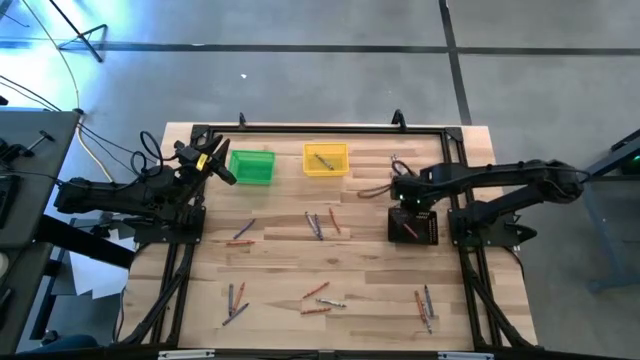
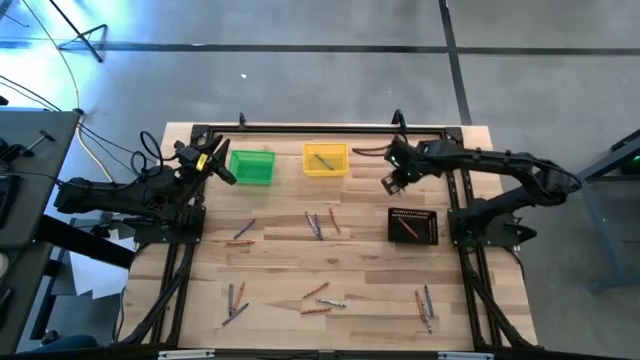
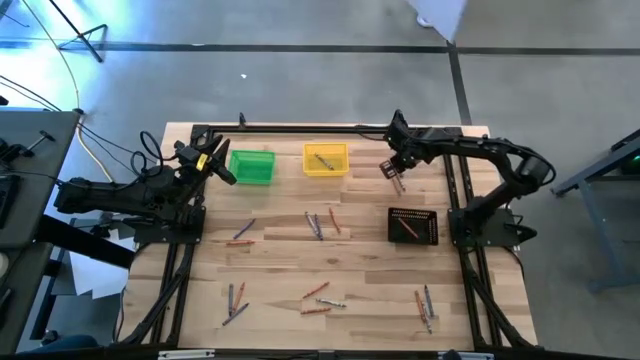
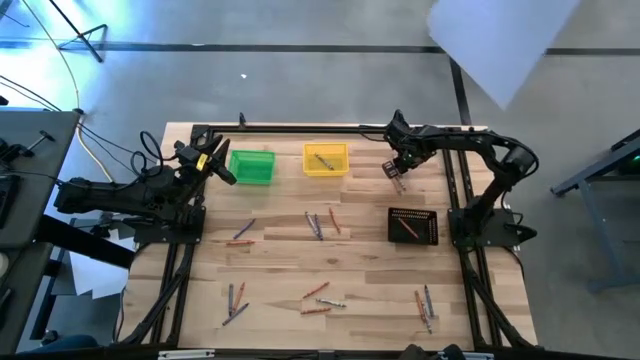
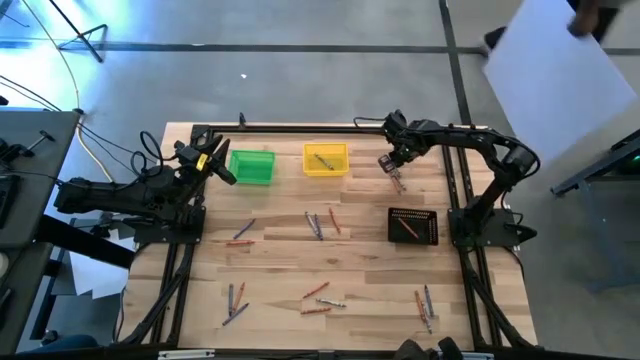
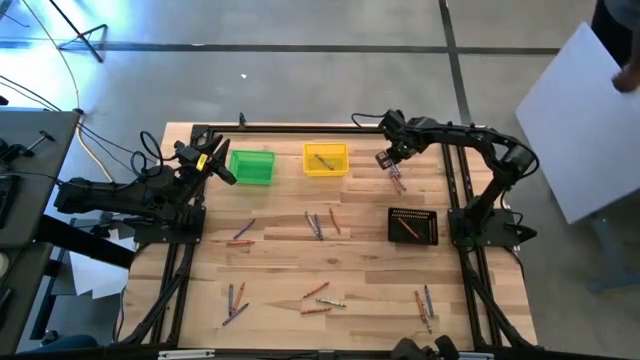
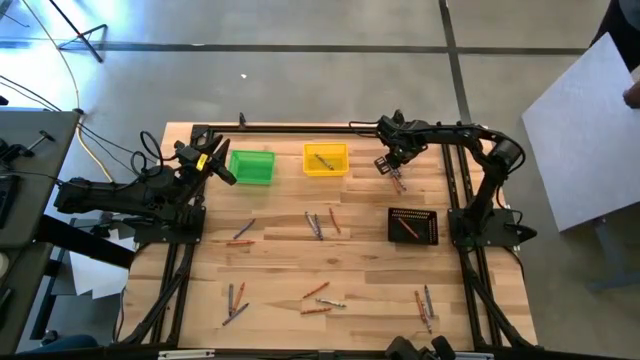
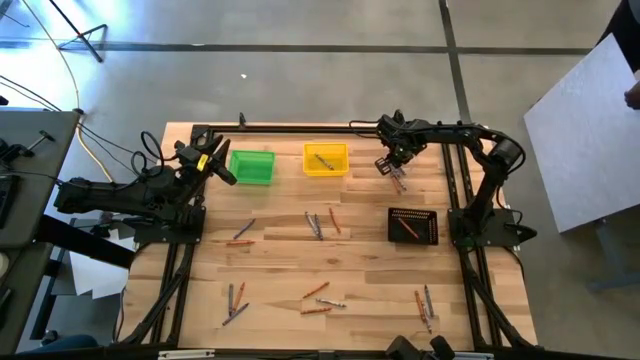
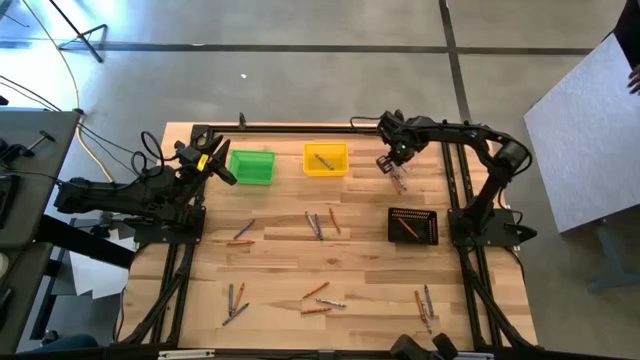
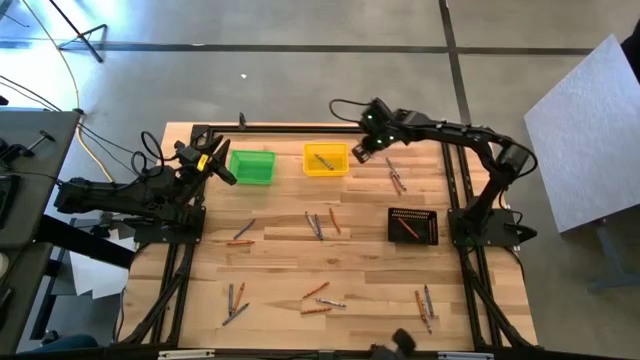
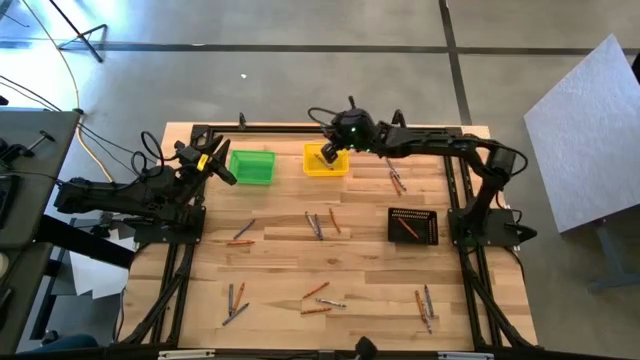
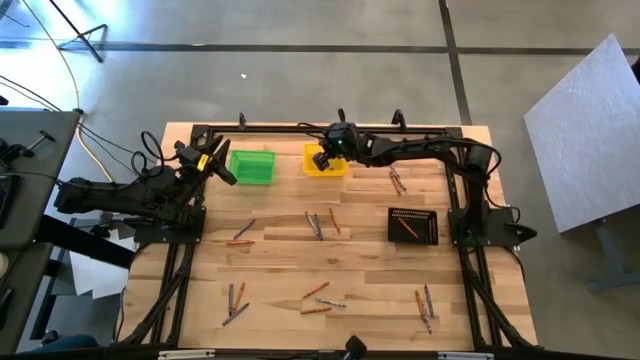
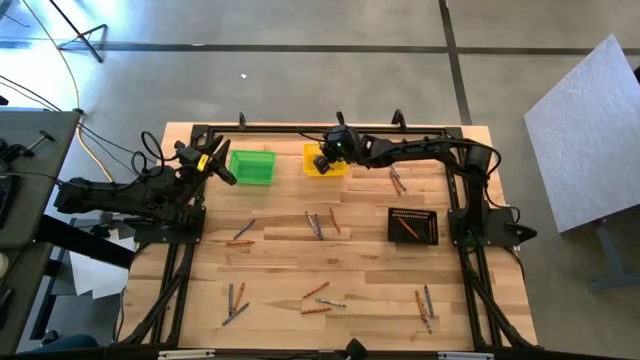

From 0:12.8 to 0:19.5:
Task: Sort crayons
Put the gray crayon into the yellow bin

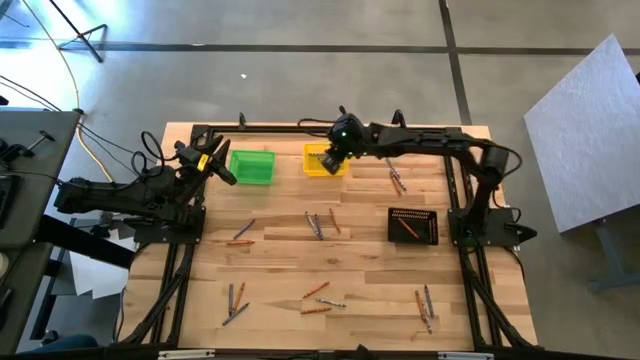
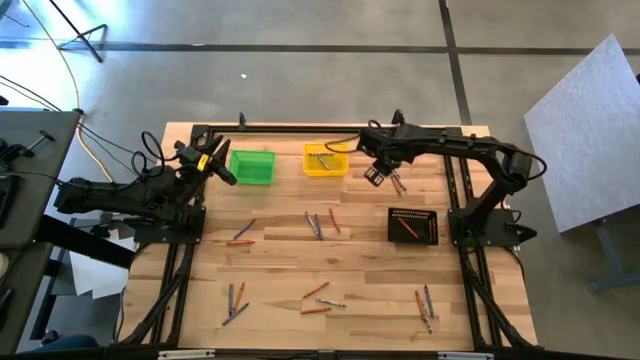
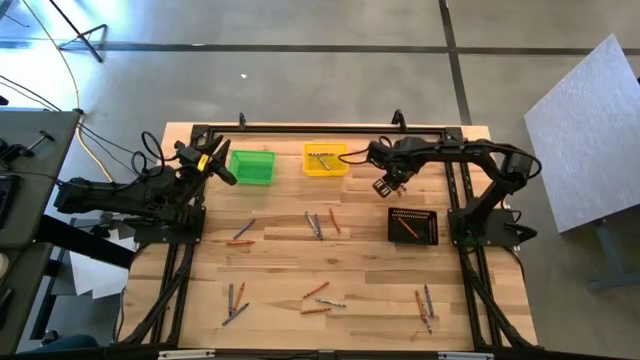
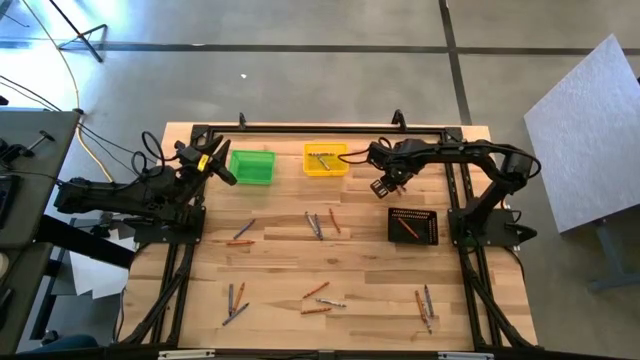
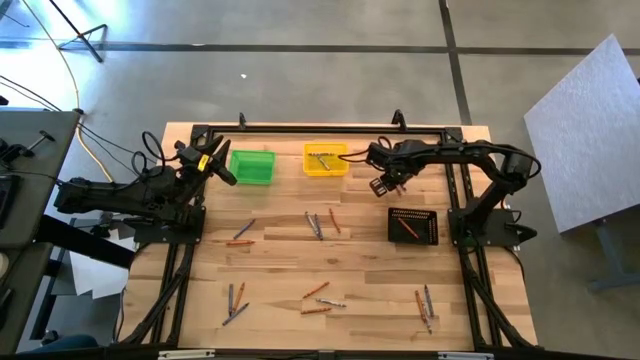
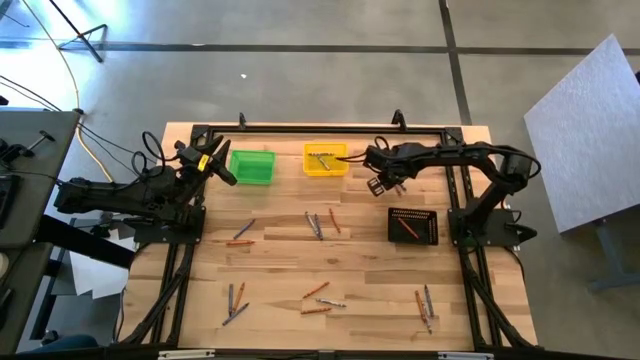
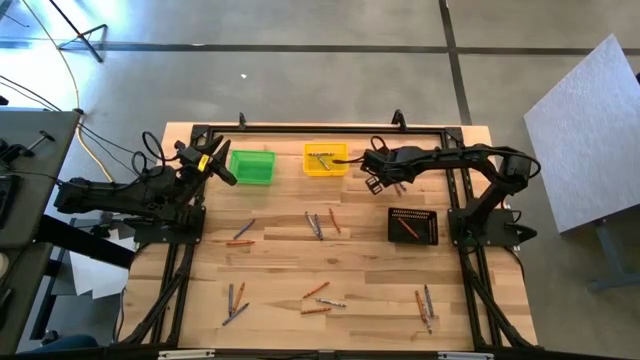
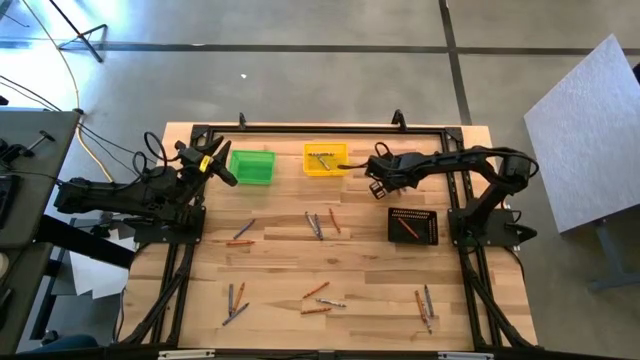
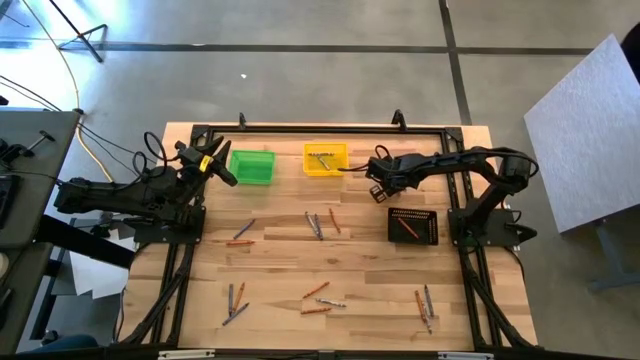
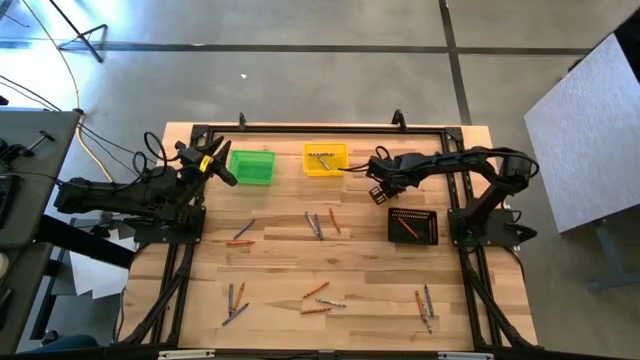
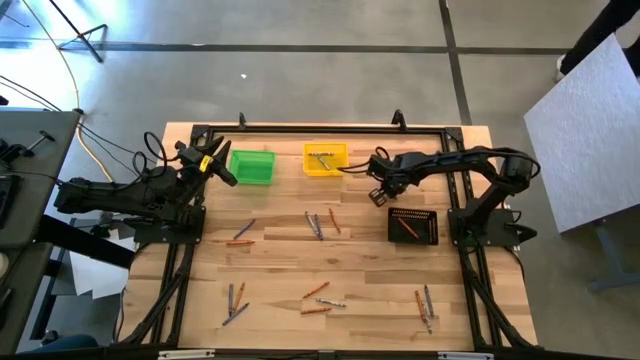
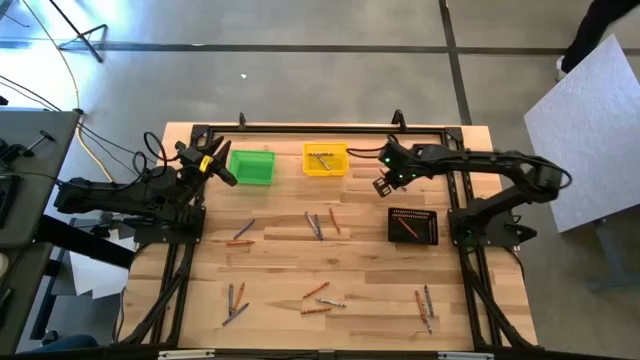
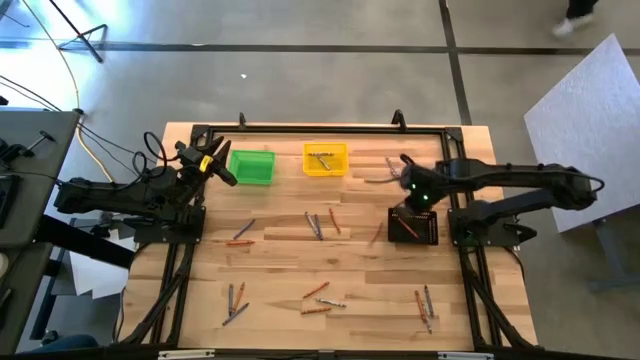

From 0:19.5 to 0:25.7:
Put the orange crayon into the black bin

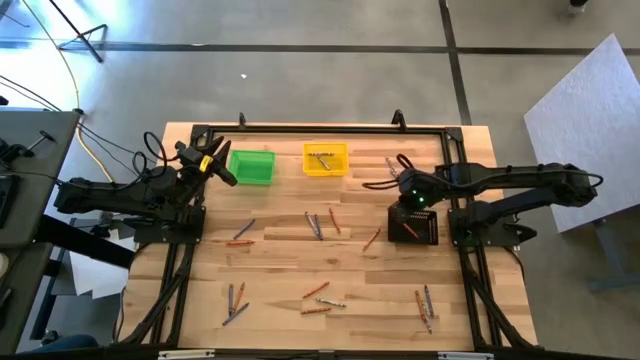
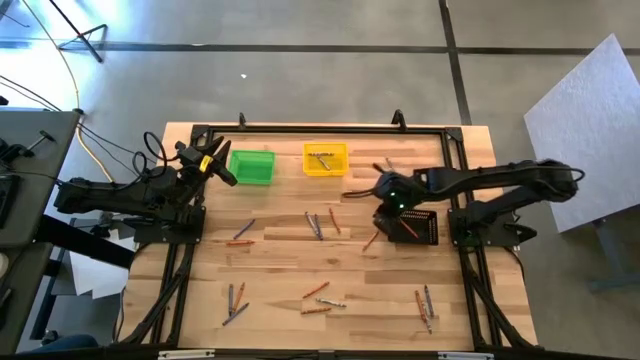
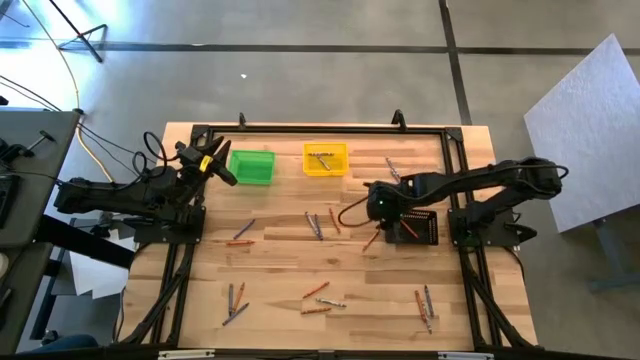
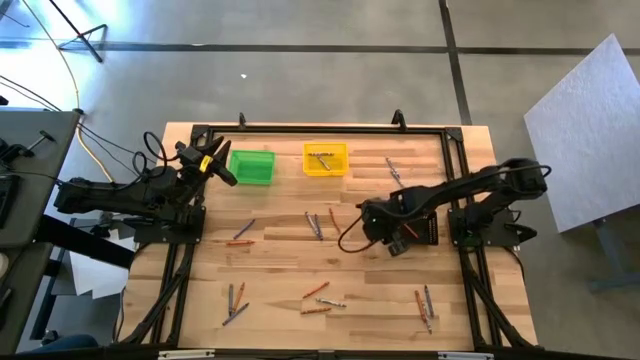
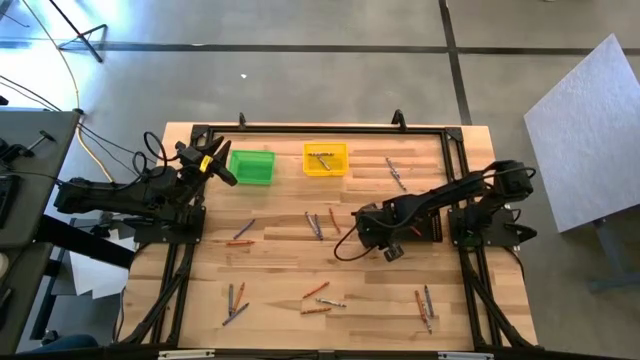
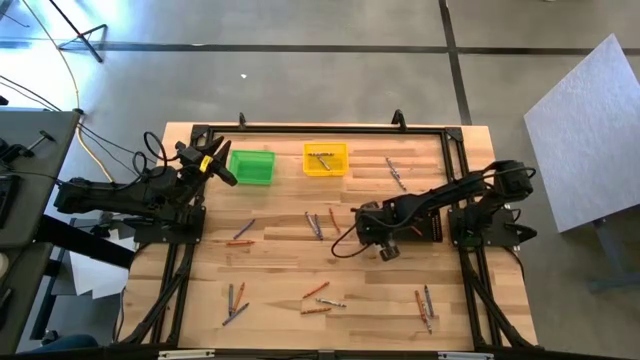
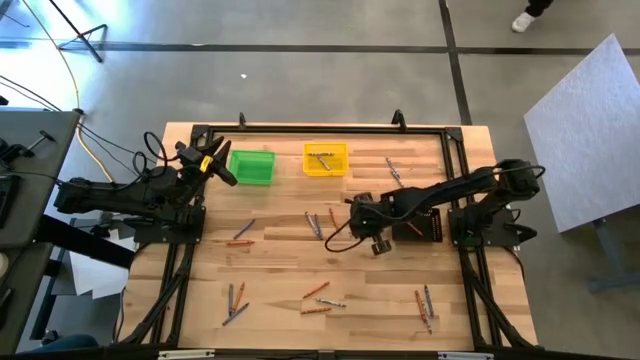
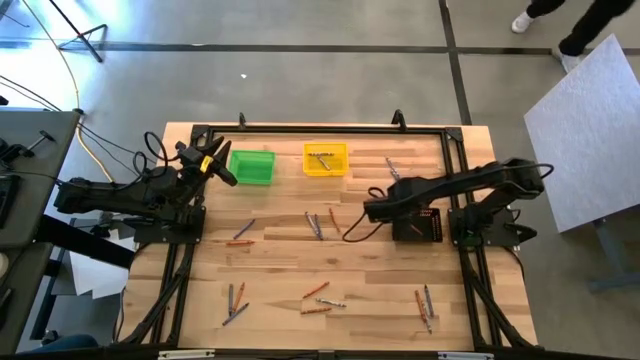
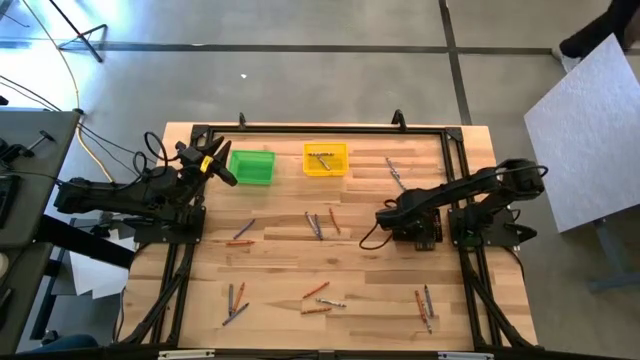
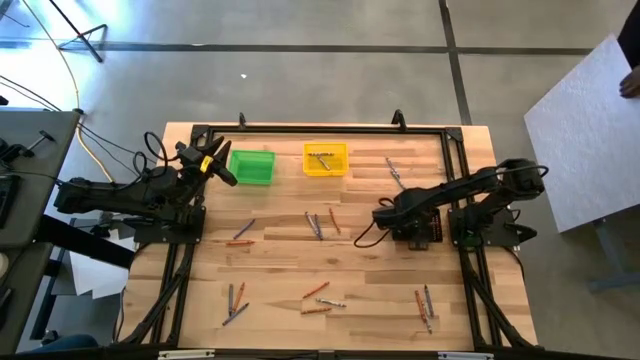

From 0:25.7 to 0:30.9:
Put the orange crayon into the black bin

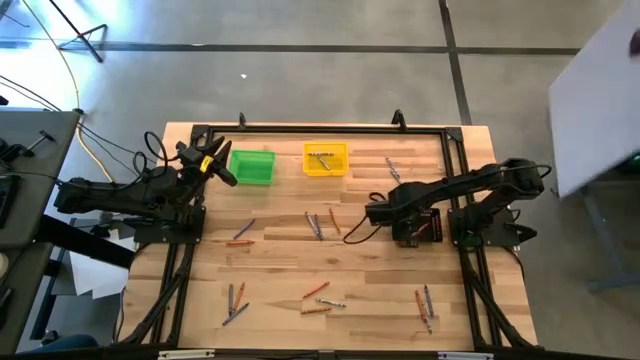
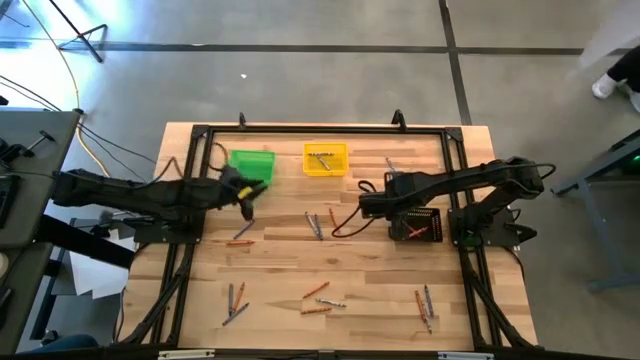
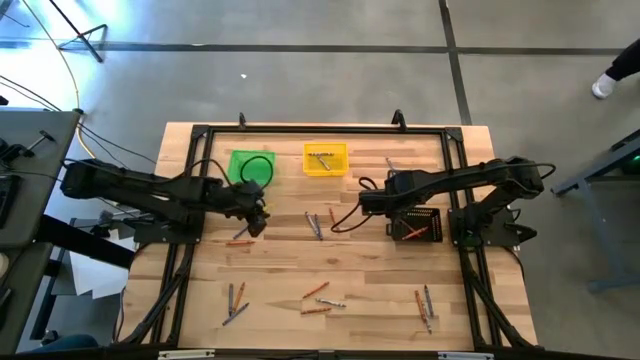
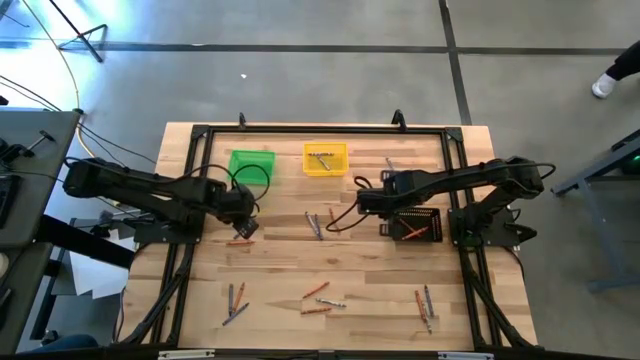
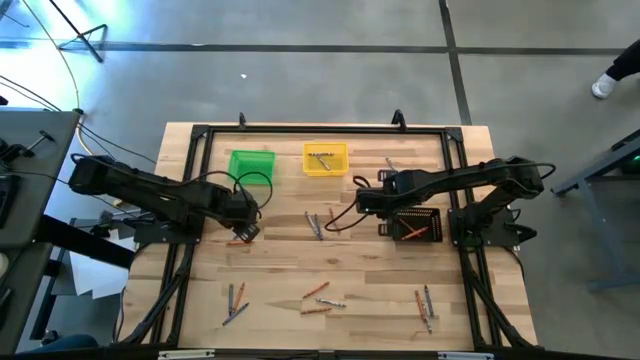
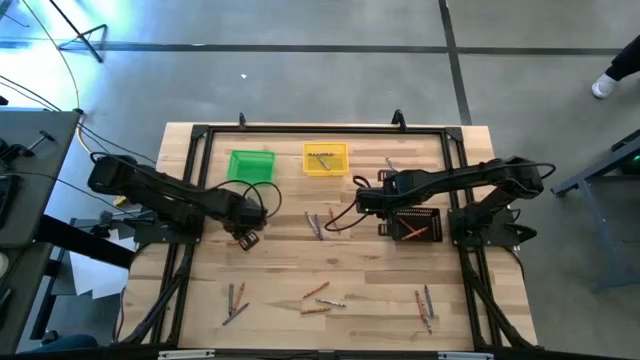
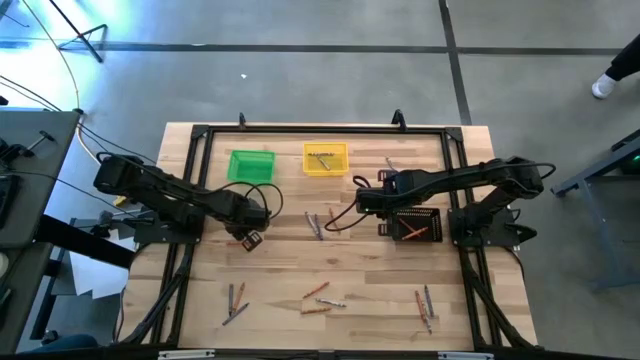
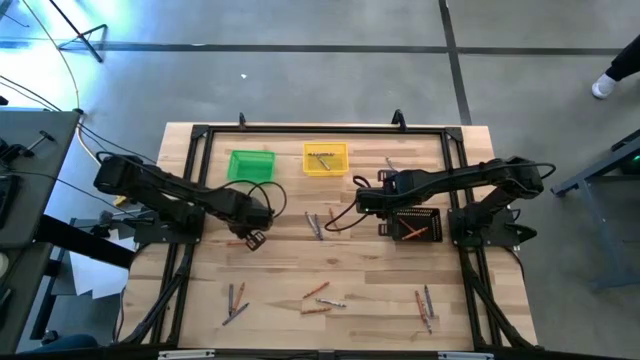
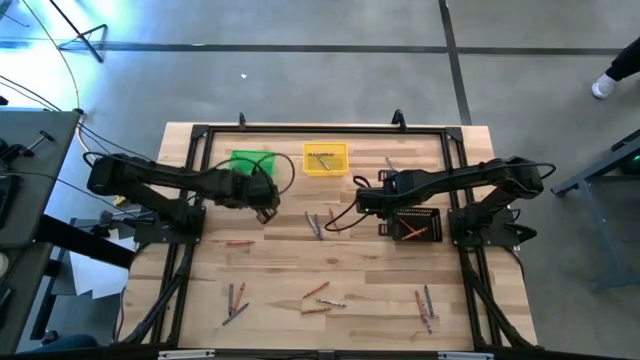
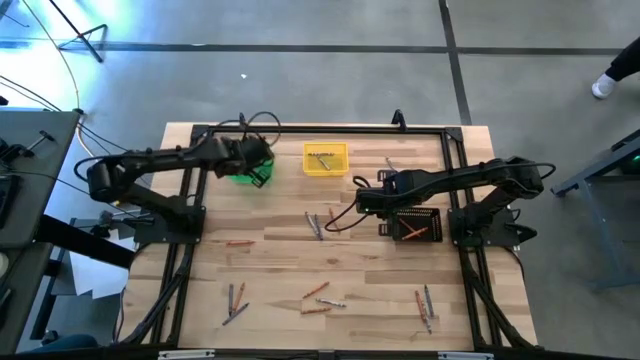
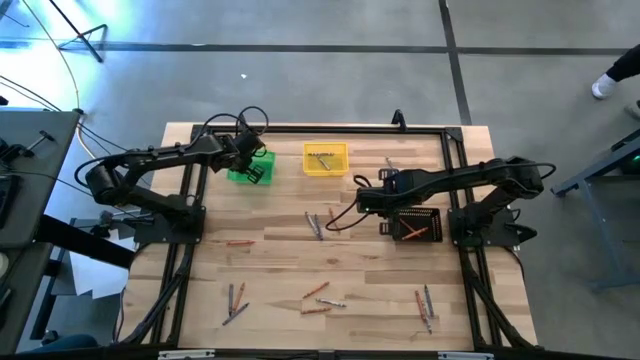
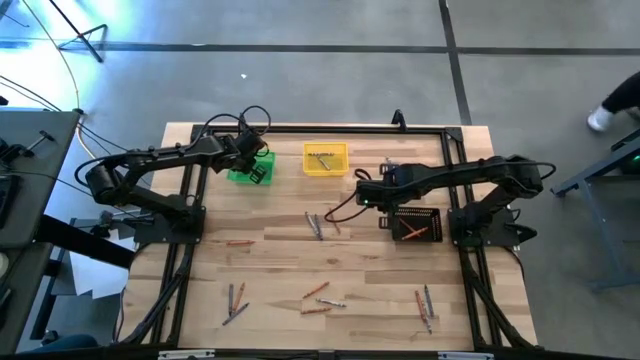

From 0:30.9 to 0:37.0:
Put the blue crayon into the green bin
